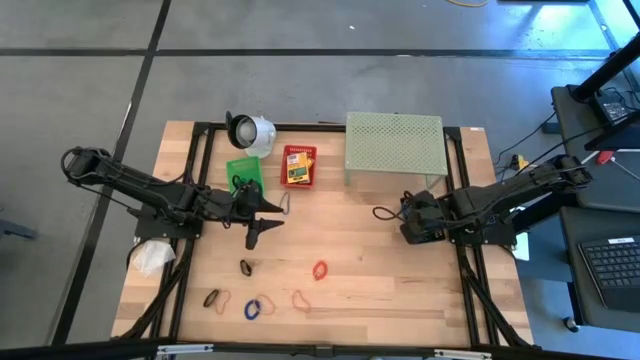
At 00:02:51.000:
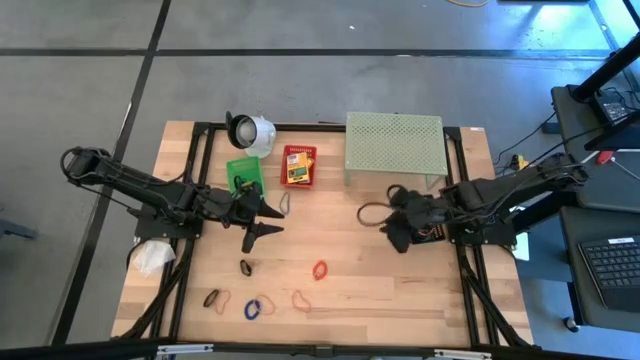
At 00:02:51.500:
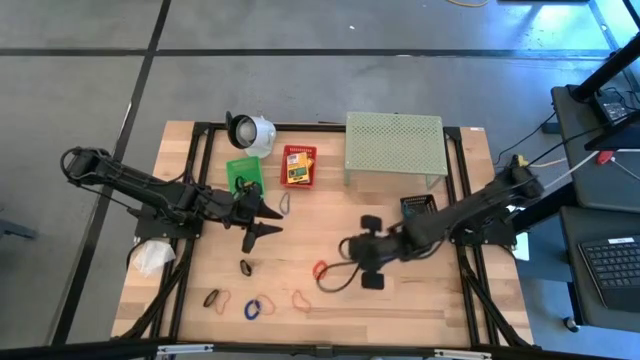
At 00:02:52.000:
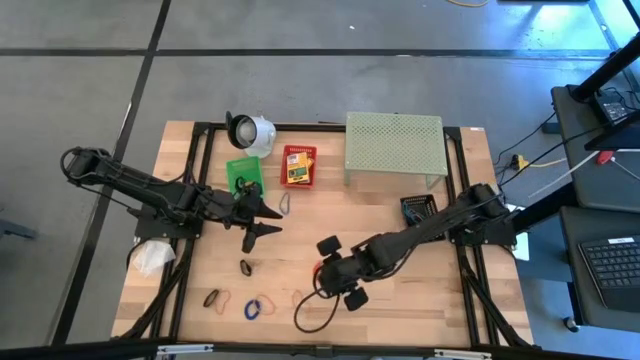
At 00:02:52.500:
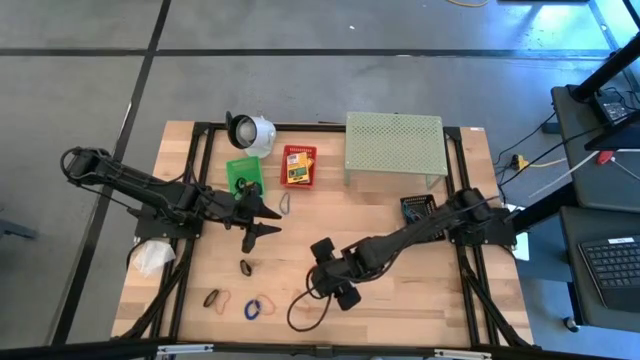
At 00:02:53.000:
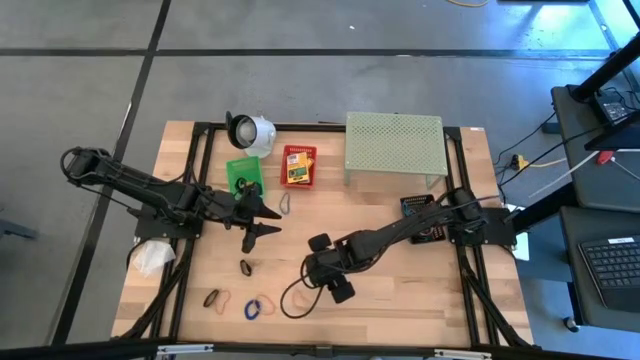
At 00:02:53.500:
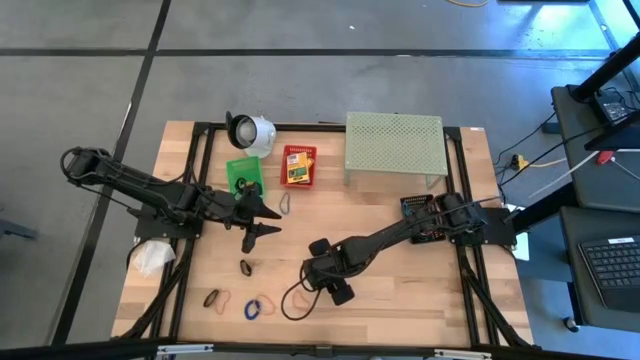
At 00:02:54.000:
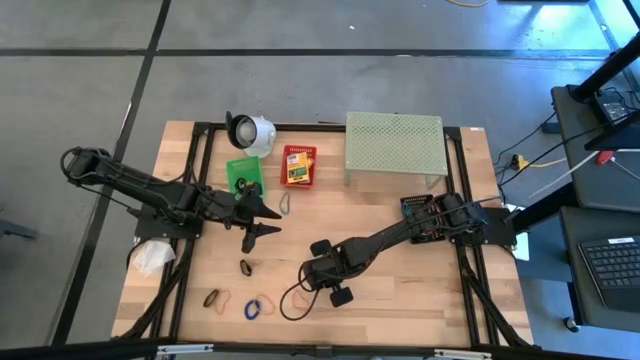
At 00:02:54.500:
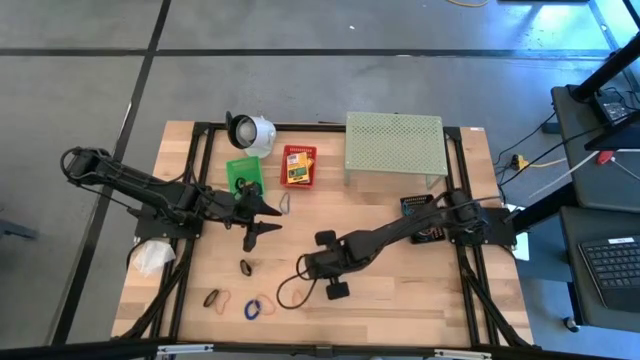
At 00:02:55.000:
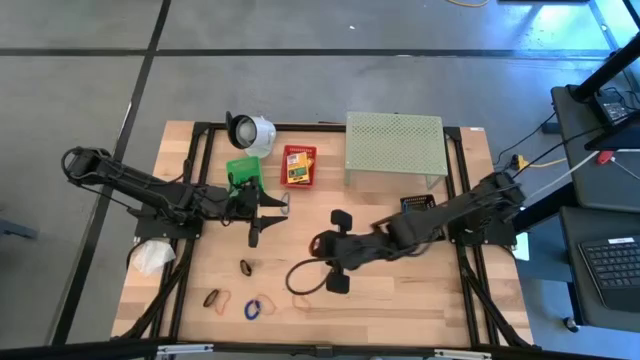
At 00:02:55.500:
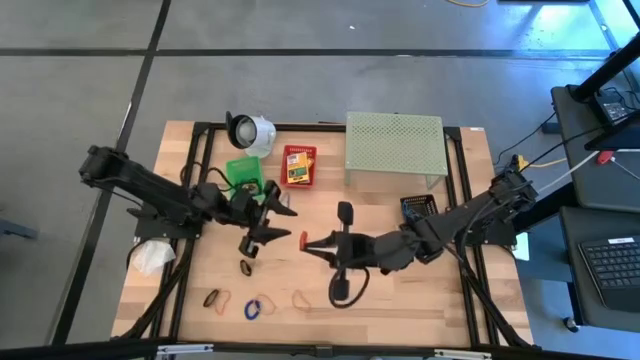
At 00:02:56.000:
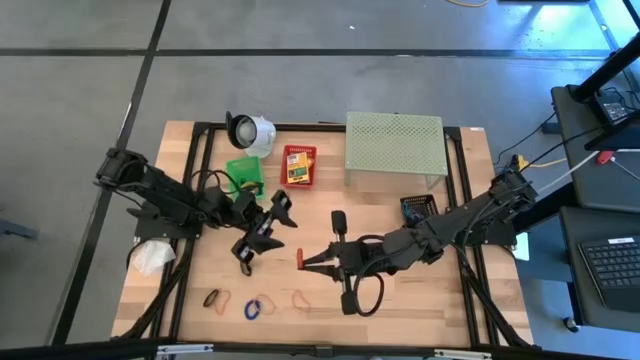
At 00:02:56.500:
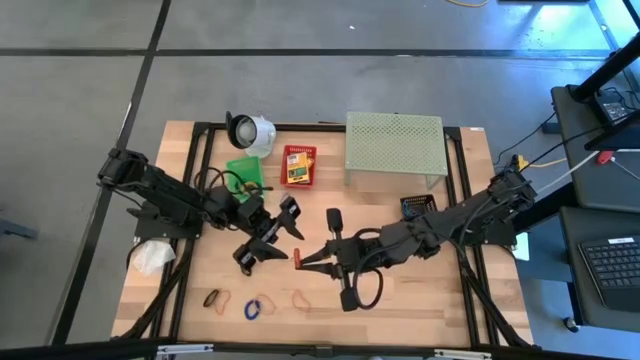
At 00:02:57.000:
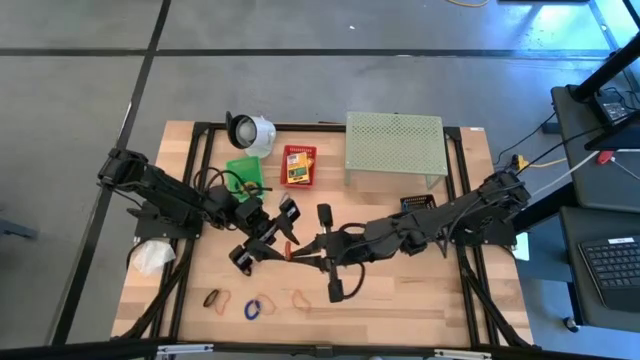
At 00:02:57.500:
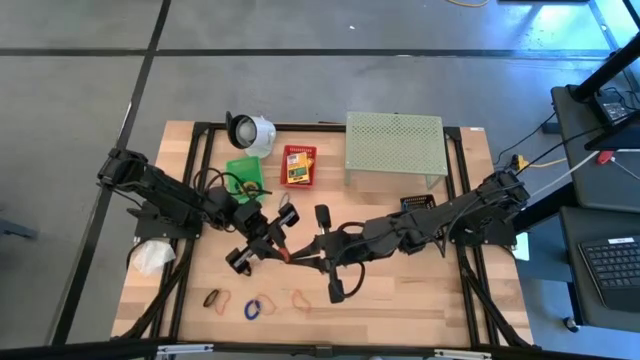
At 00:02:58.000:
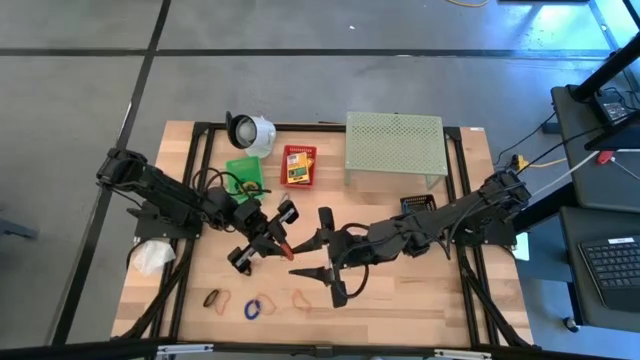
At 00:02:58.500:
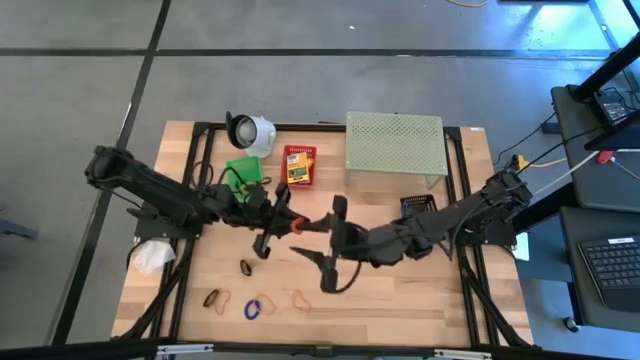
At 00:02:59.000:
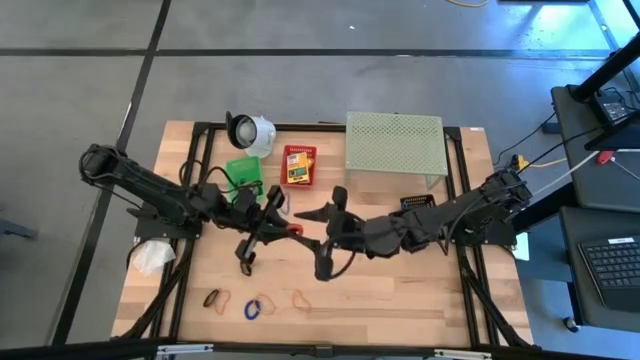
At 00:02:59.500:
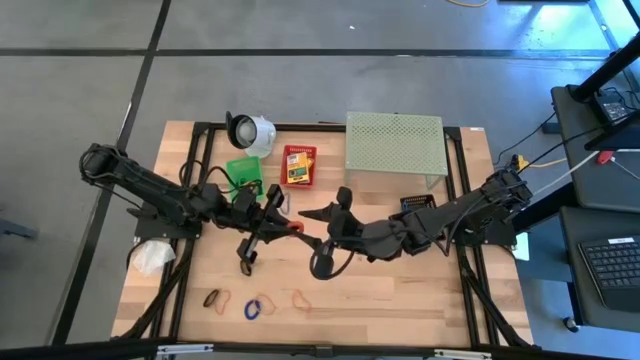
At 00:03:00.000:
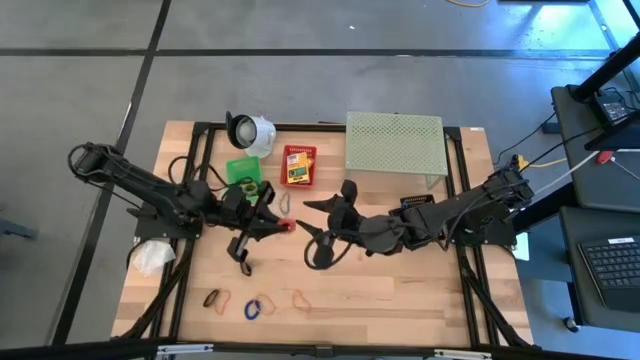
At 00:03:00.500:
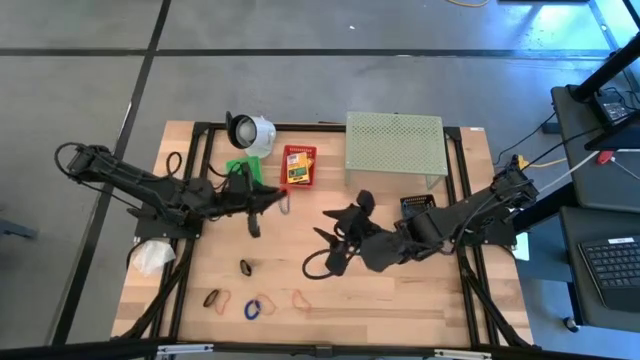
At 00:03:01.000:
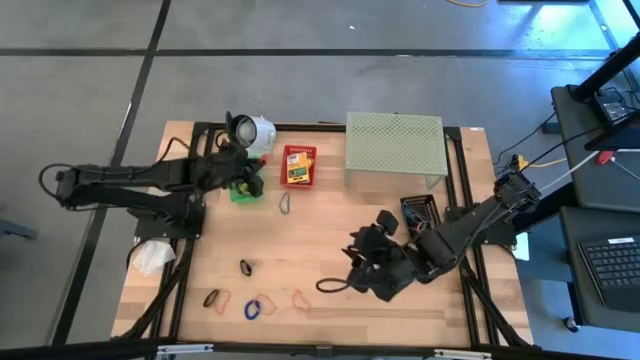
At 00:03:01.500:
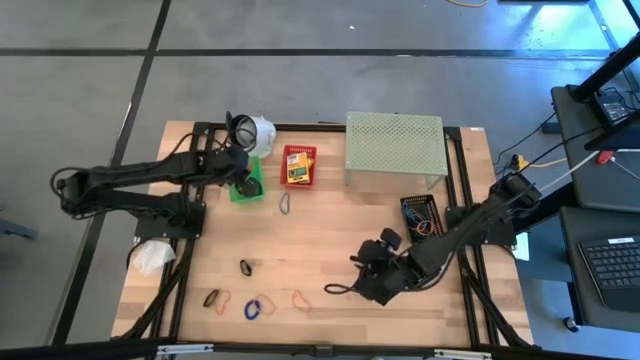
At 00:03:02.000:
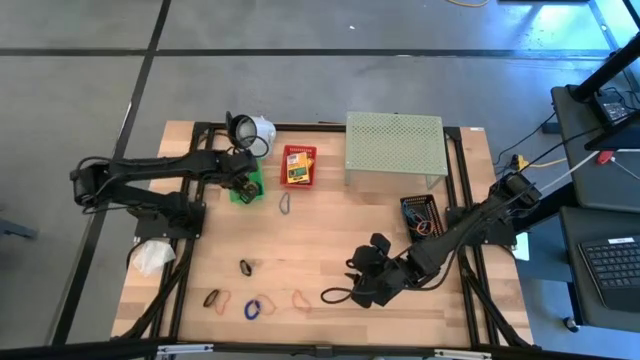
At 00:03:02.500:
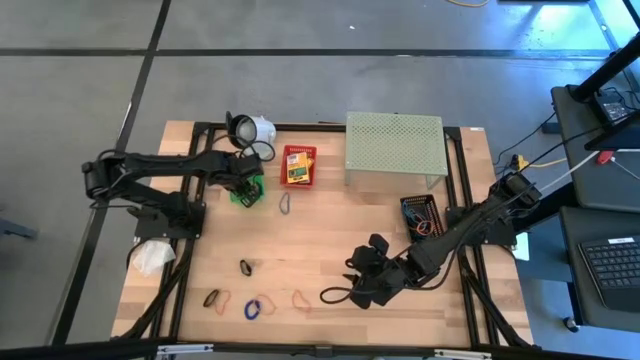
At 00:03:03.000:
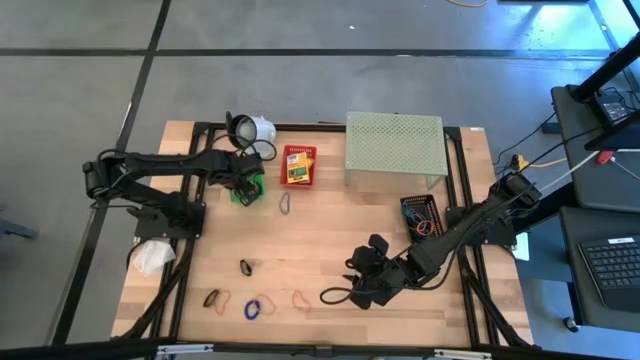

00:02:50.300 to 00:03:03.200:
Task: Pick & Place Office Desk Supplies
Put the orange spring keychain into the green basket

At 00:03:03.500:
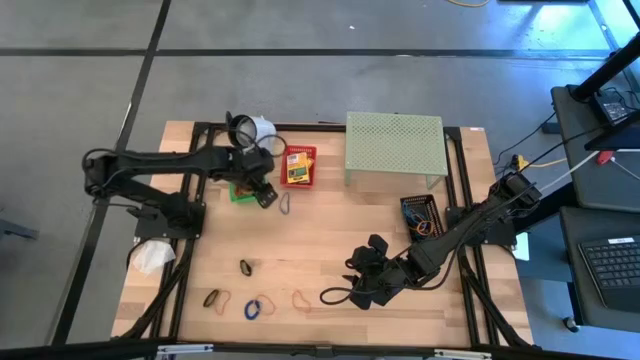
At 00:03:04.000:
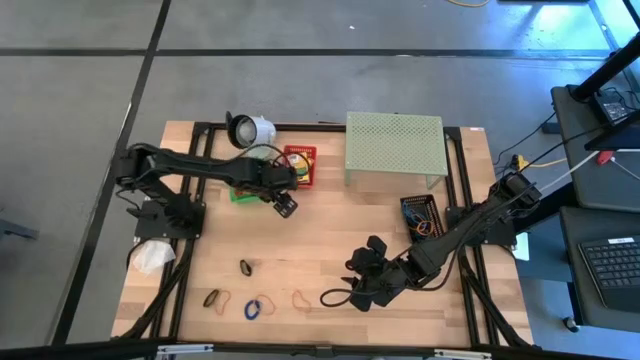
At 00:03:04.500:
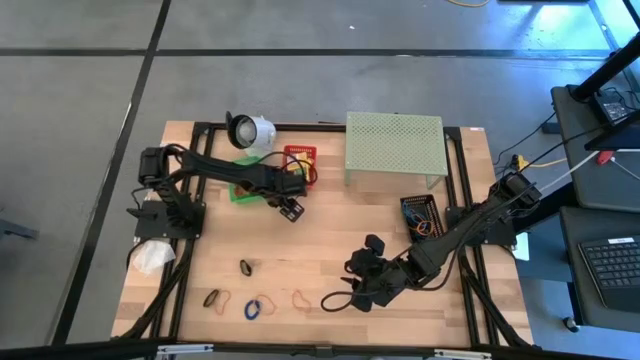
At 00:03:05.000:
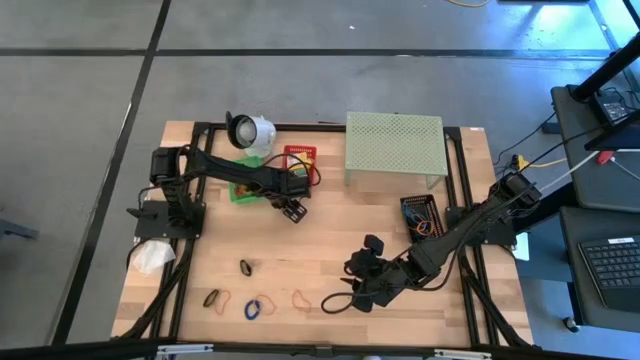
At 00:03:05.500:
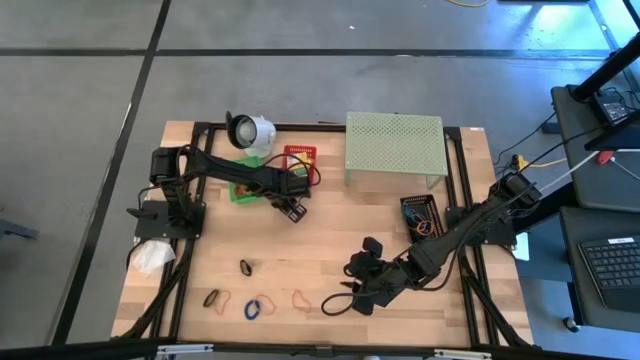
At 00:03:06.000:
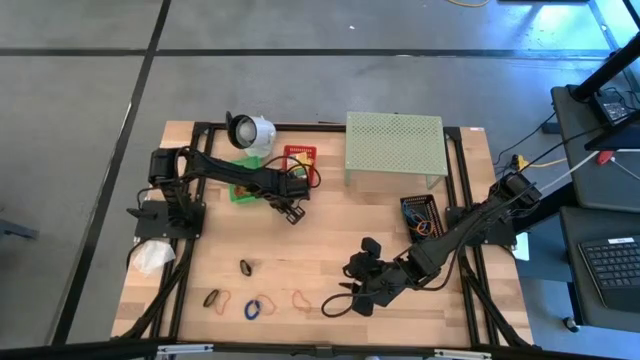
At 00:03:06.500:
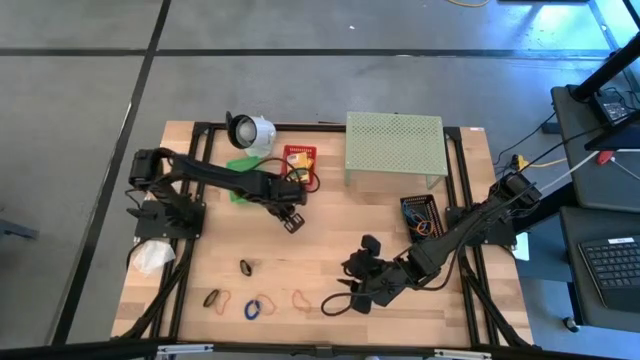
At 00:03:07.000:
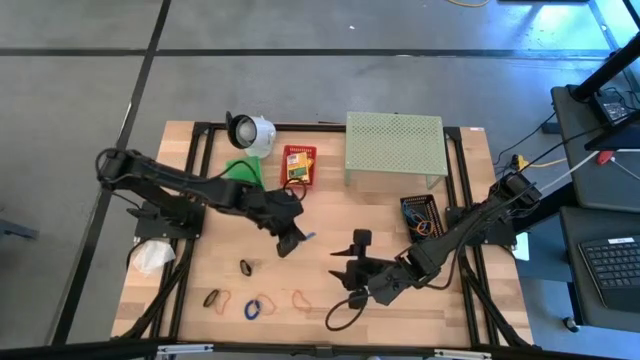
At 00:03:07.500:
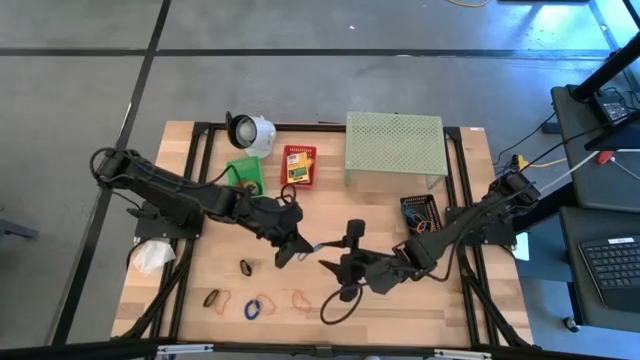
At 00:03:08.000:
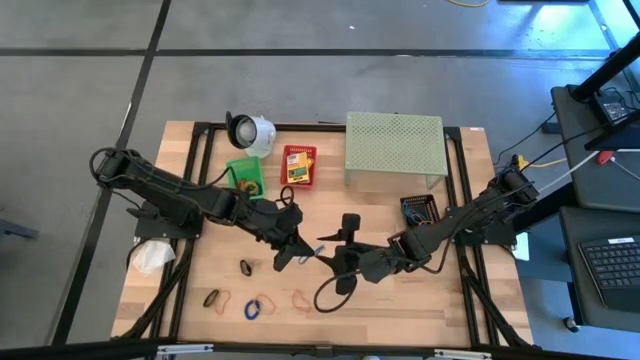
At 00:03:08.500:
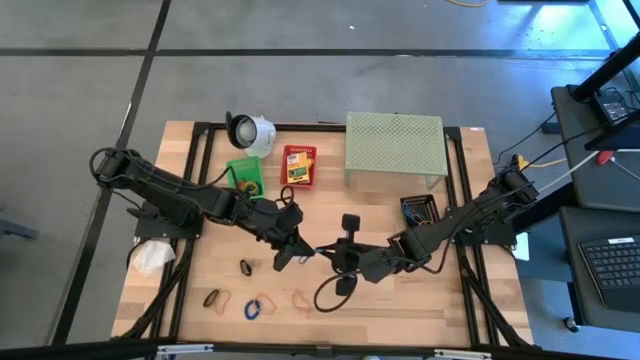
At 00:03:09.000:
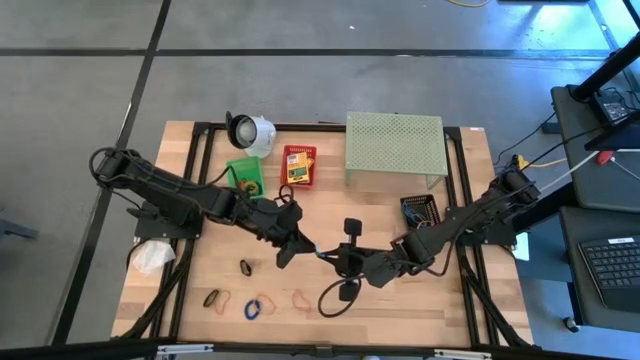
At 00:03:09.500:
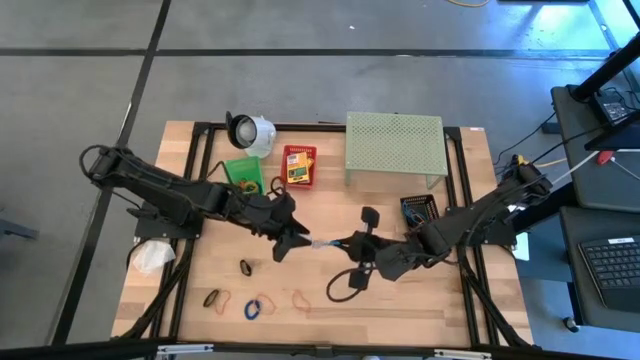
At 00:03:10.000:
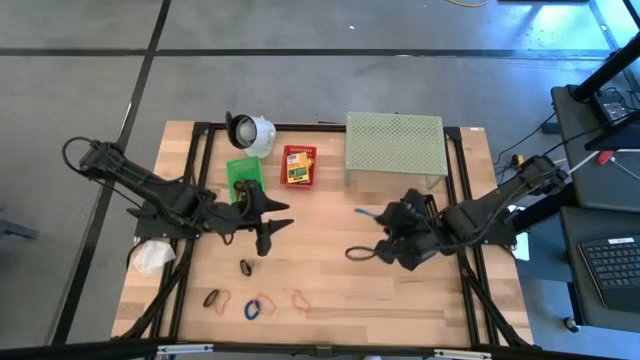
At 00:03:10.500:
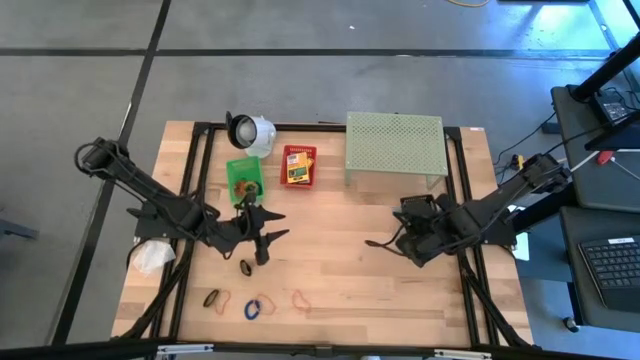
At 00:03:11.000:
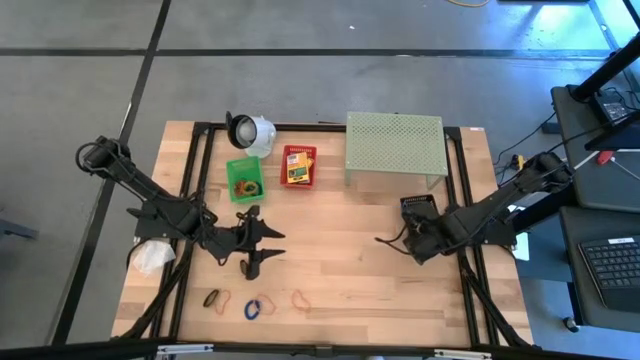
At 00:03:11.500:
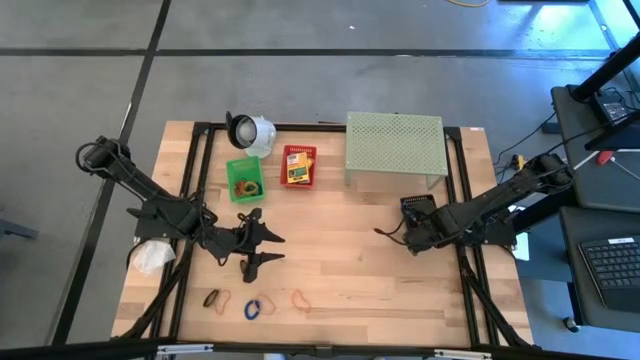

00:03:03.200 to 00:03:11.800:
Put the blue rubber band into the black basket
